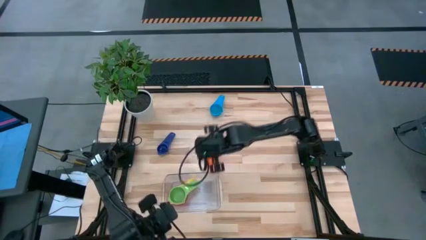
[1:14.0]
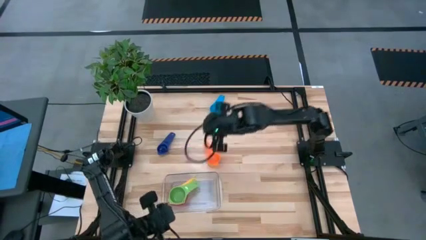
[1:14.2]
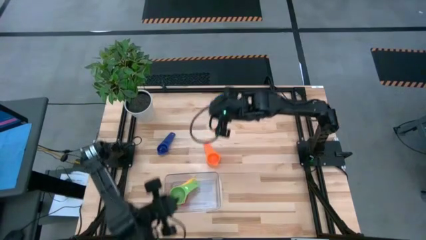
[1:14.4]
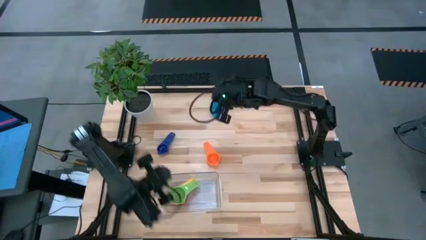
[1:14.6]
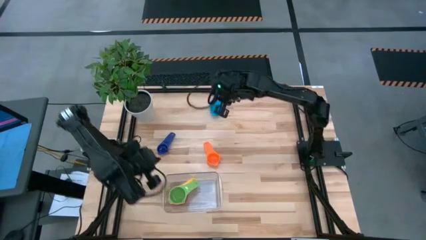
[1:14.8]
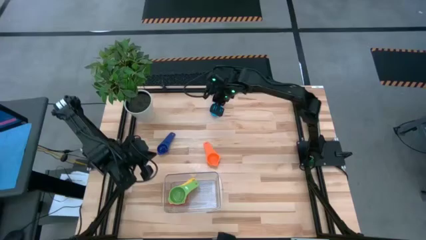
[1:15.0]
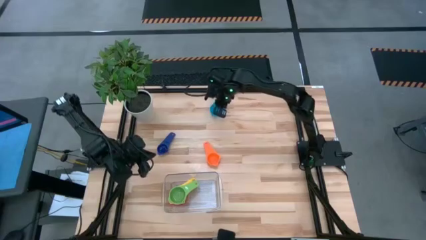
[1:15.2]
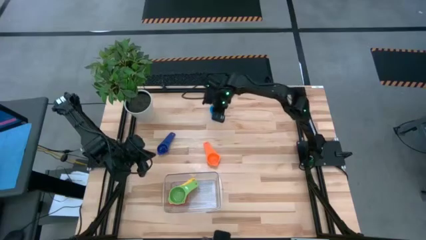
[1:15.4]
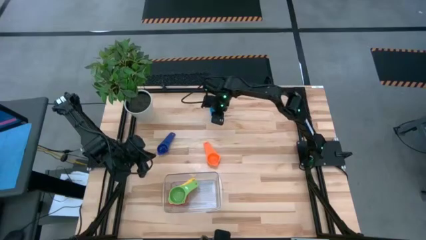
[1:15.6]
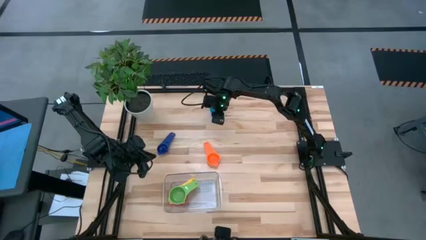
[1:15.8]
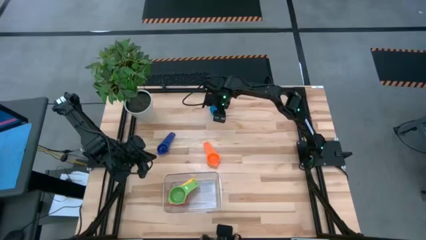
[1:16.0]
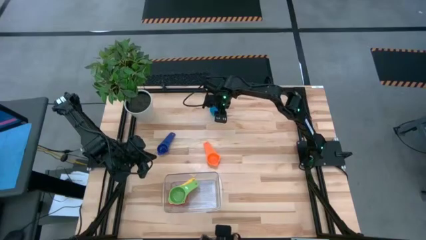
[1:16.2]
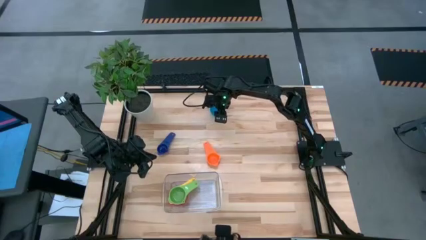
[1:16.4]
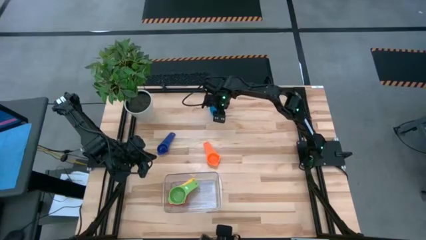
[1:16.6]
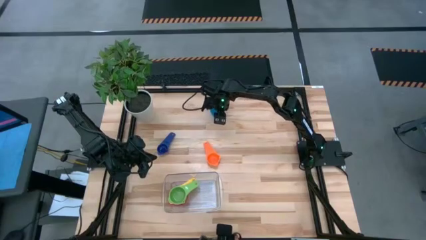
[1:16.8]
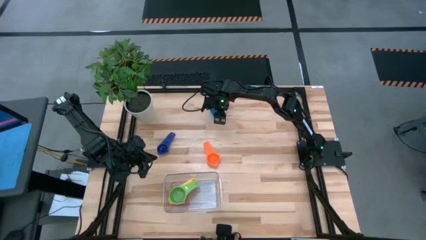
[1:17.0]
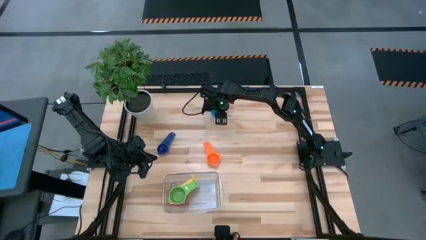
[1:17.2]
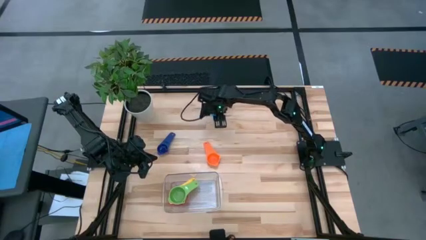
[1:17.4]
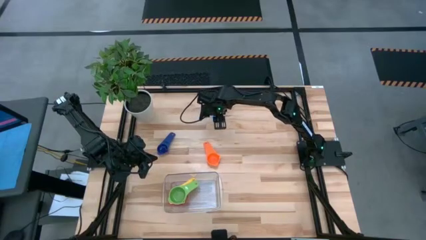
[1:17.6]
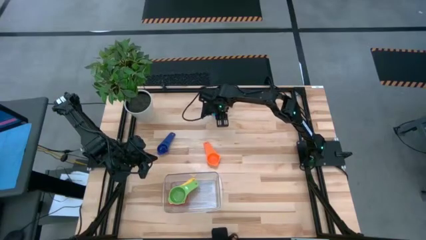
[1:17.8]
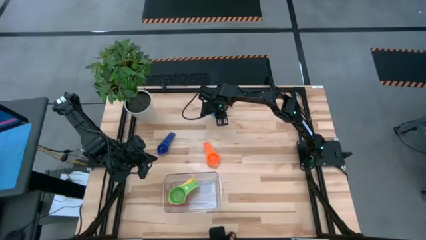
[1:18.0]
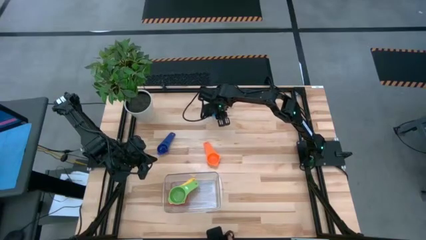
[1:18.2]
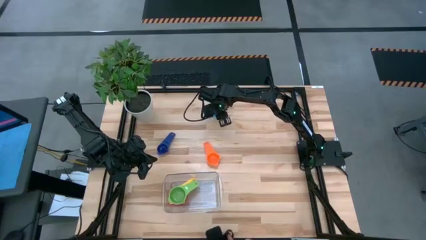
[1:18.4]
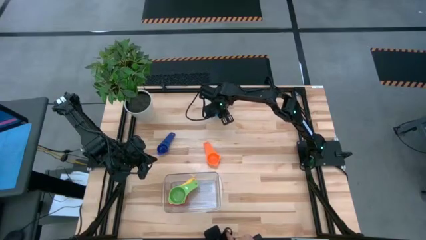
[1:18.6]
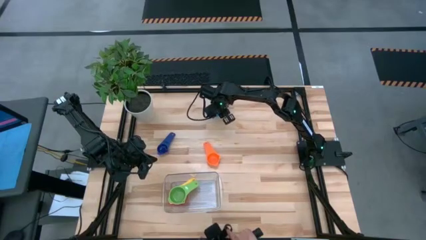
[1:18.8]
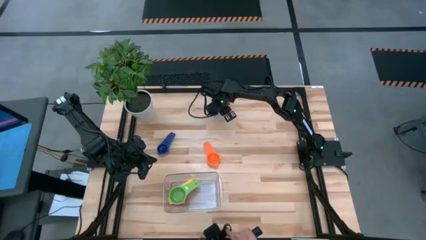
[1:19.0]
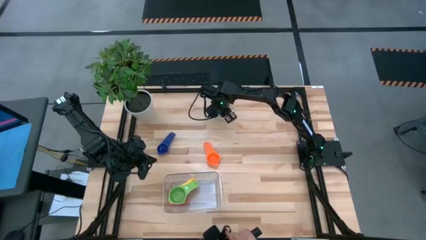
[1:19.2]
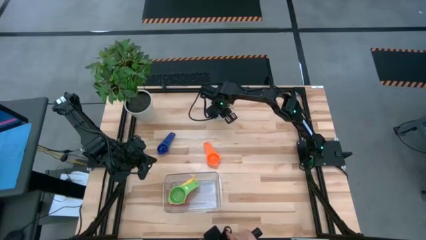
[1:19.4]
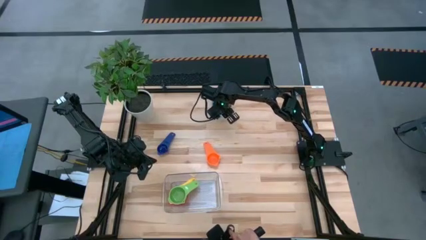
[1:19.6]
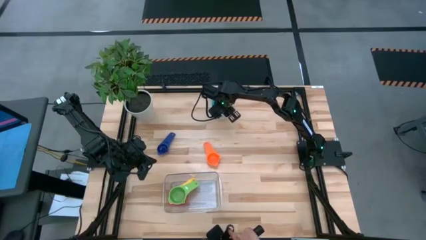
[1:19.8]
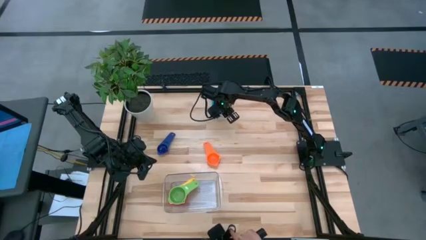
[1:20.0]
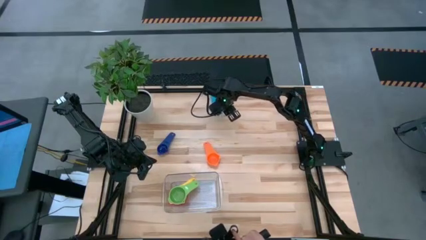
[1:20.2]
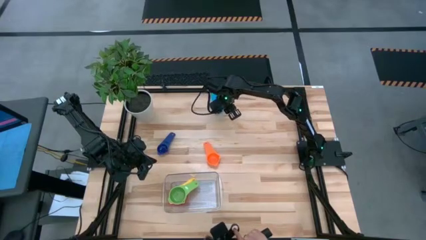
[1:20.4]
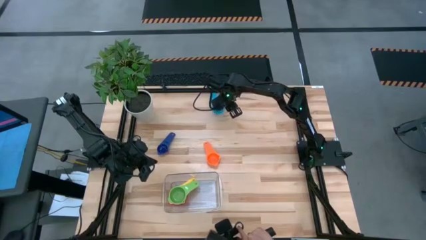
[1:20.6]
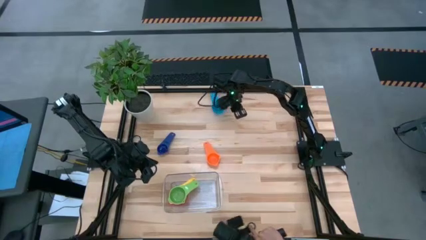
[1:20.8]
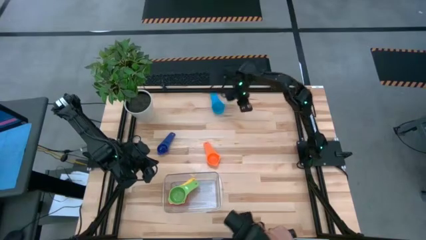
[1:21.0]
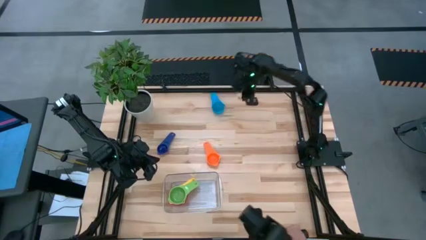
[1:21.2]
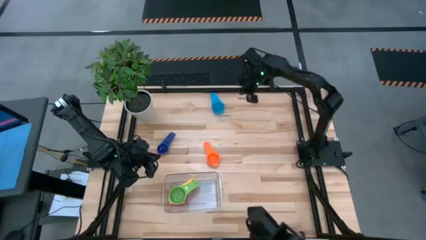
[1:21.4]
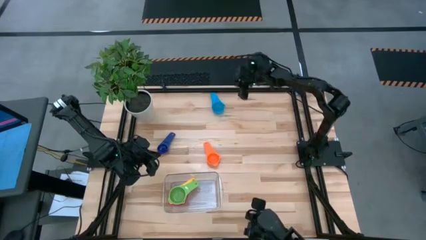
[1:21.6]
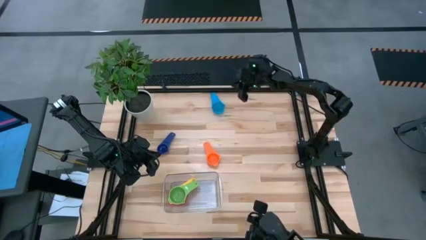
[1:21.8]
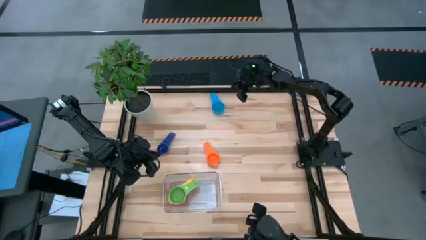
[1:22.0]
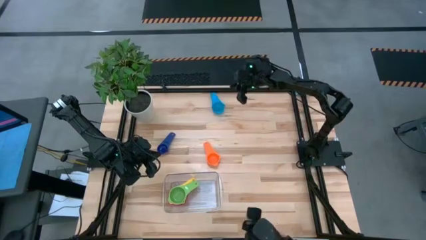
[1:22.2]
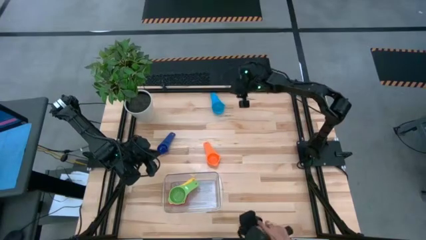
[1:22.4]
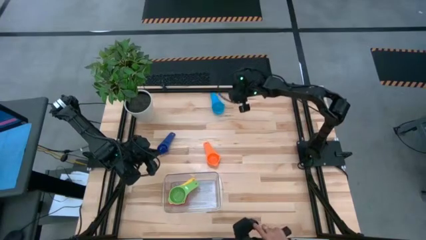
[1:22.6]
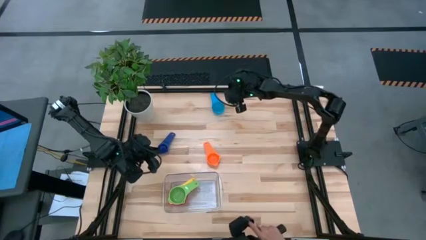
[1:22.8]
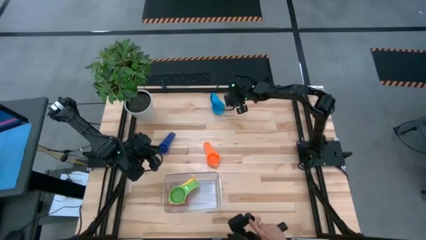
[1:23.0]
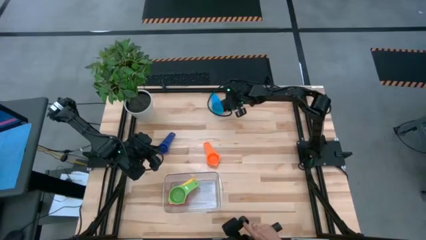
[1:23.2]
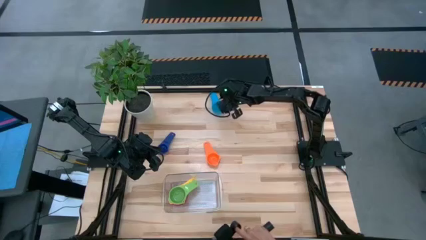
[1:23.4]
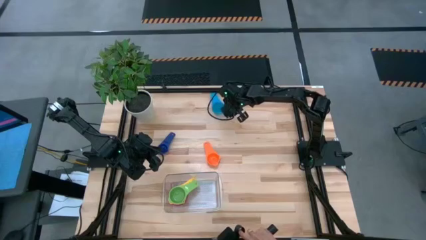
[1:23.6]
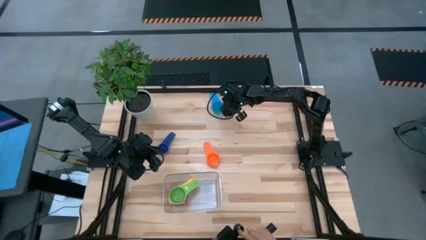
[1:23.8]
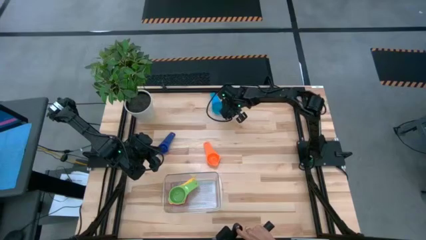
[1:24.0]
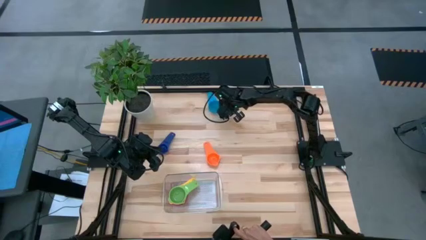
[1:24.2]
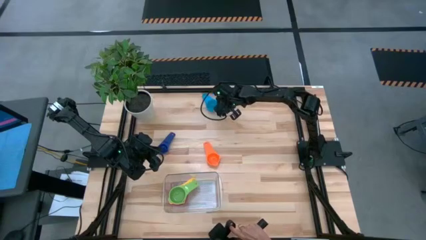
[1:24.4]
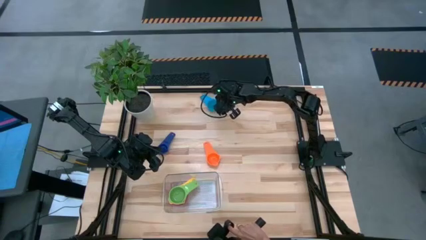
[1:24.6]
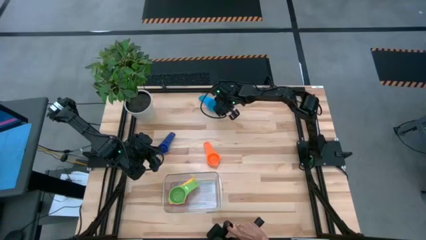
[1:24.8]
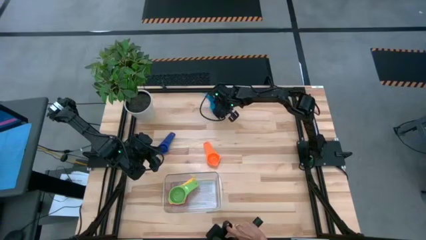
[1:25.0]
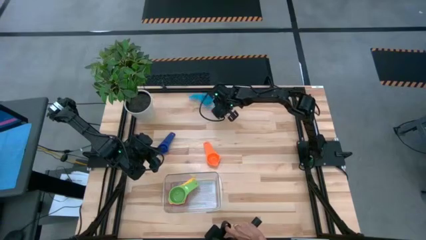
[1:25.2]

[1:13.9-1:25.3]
Task: Nest measuring cups in basket
Stack the light blue measuring cup on top of the green measuring cup into the transparent bin

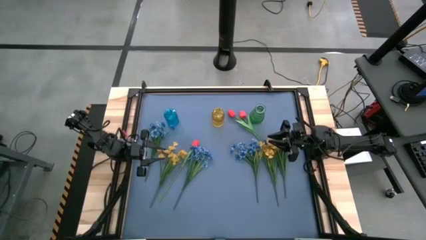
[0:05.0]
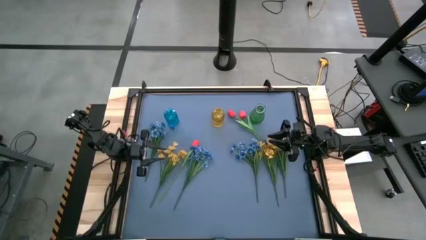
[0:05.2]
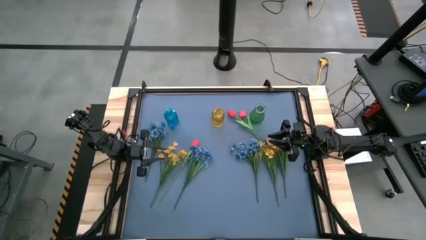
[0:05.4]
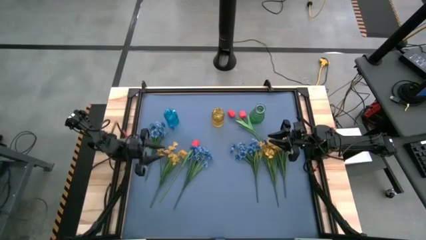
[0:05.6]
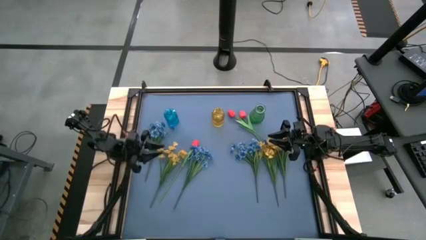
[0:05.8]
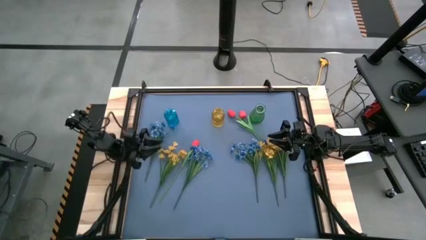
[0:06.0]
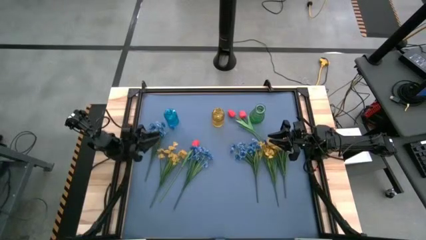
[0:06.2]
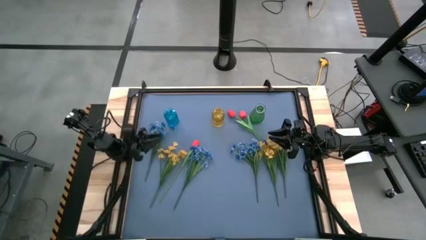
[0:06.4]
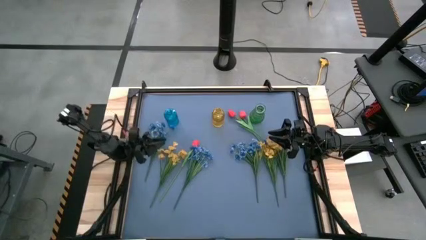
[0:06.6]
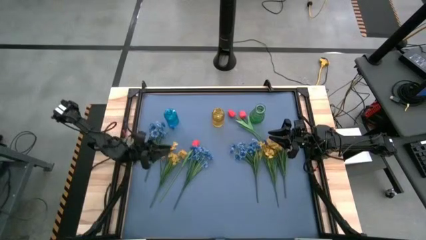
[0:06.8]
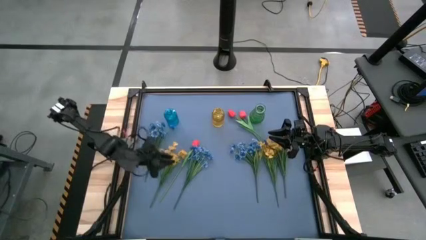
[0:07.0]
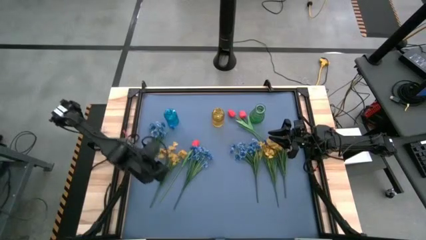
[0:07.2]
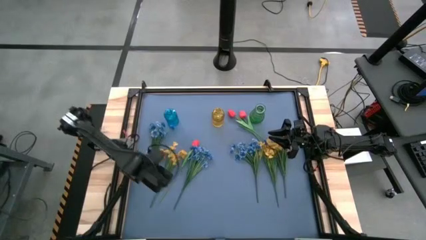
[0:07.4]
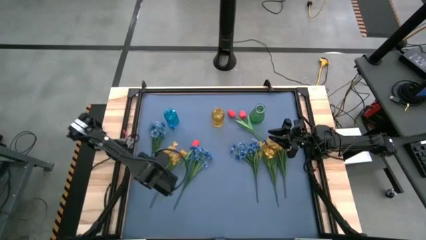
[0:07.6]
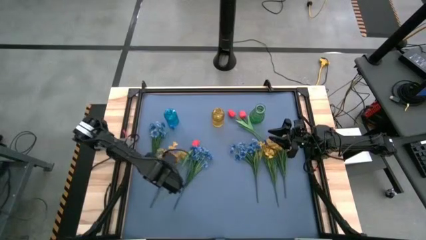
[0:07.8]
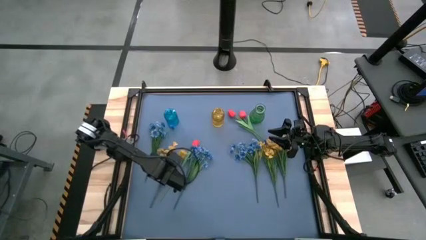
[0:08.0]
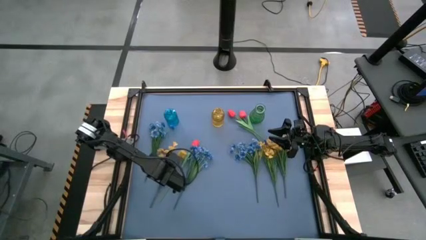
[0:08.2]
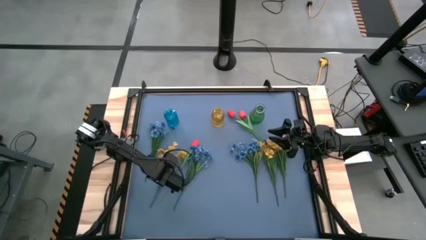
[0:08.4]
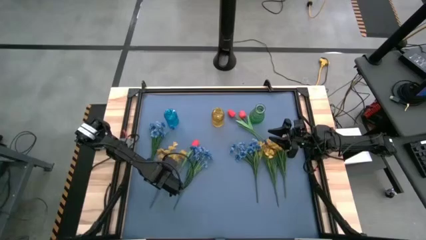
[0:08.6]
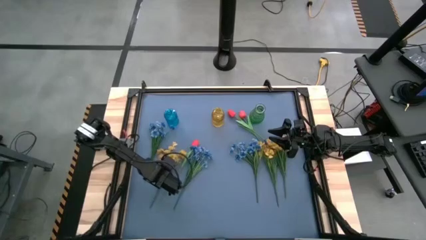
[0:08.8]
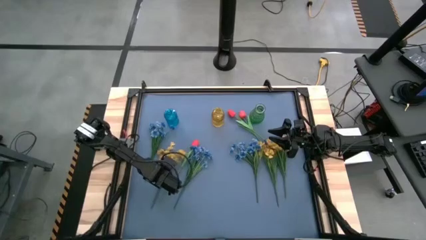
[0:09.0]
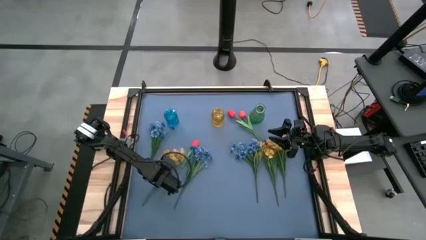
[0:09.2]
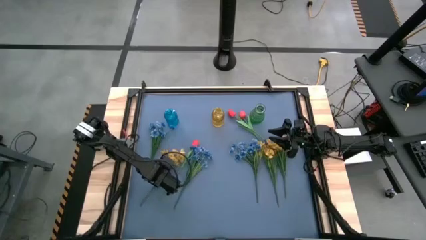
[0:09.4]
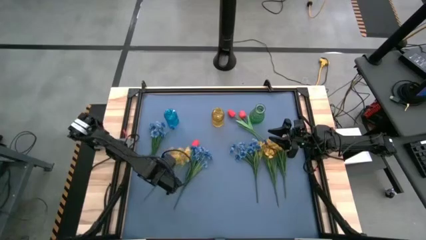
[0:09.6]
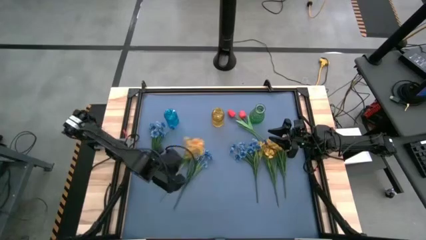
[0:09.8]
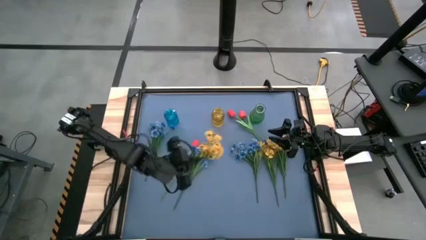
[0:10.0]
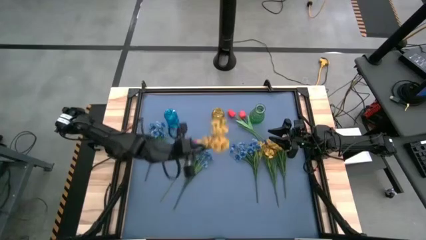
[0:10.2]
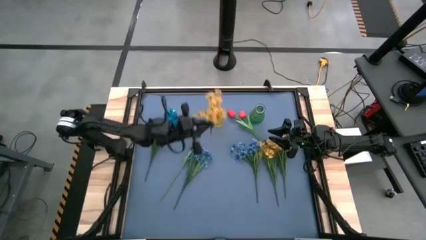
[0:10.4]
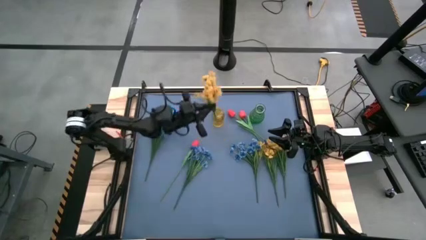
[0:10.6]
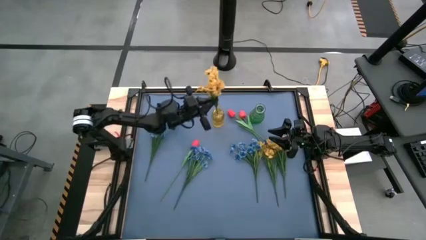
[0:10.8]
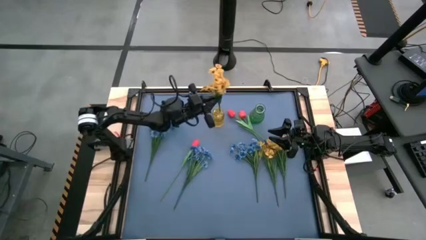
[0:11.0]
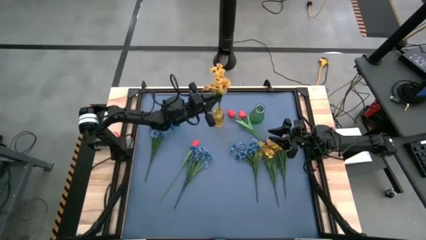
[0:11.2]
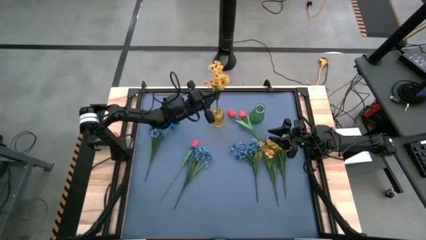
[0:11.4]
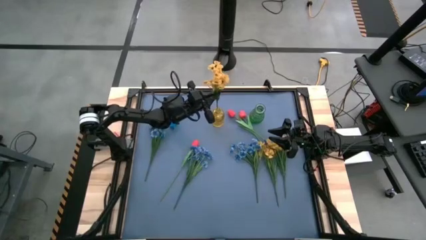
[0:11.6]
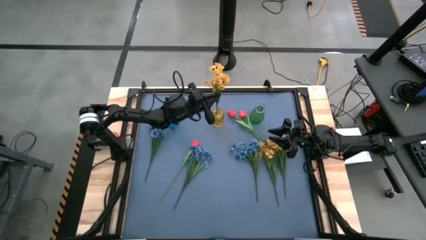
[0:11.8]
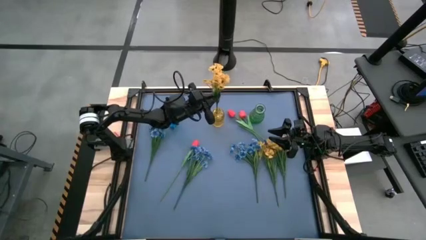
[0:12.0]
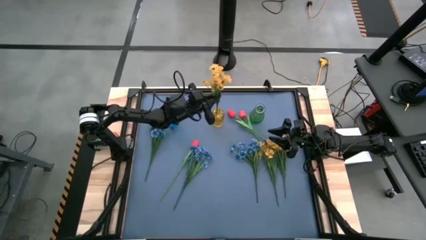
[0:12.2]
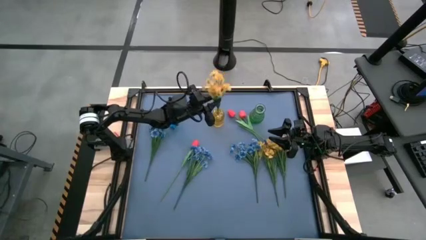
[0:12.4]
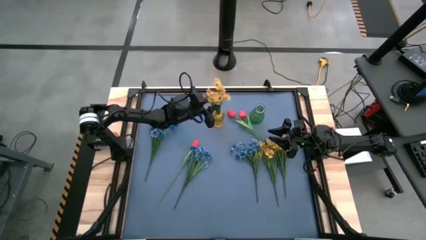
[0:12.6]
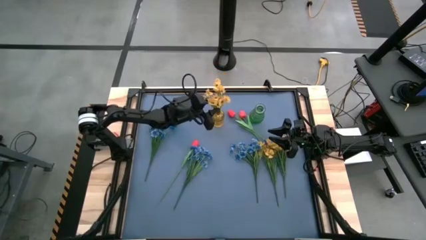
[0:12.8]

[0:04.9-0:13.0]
Task: Sort flowers into vase by color
Put the left yellow flowers into the yellow vase
